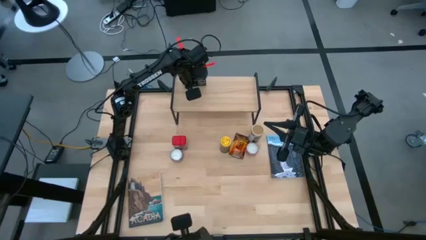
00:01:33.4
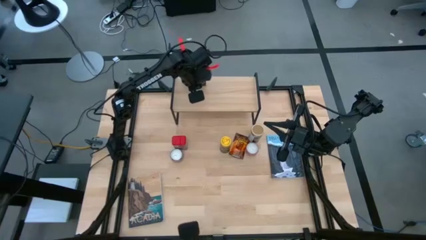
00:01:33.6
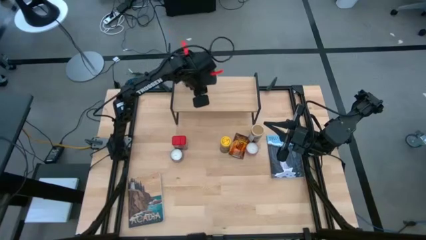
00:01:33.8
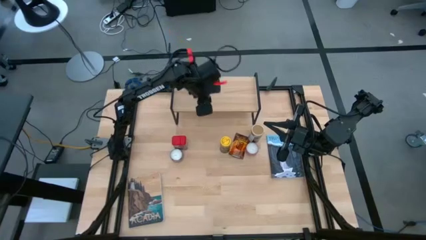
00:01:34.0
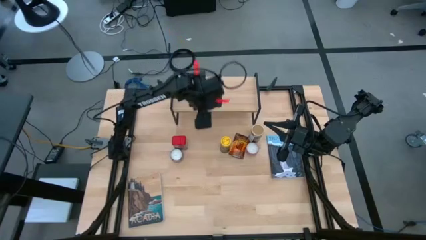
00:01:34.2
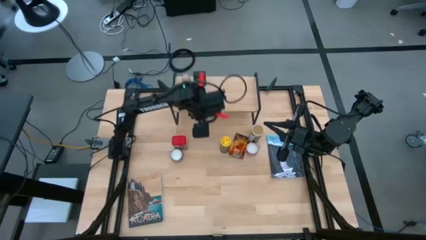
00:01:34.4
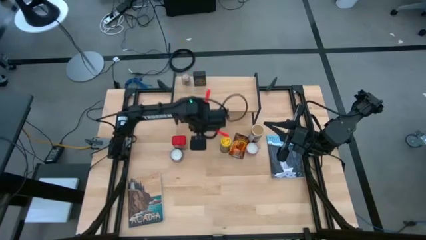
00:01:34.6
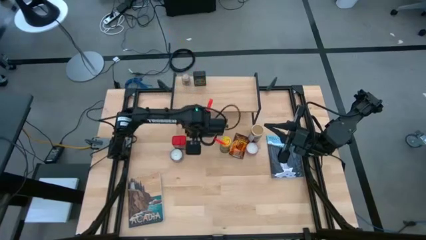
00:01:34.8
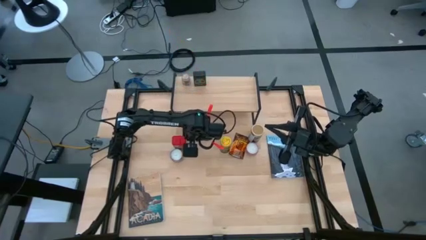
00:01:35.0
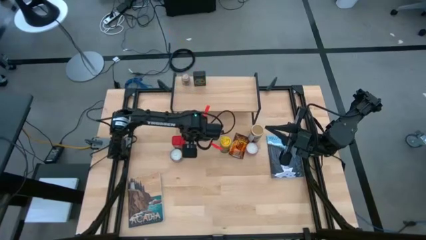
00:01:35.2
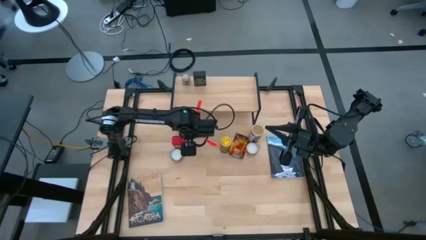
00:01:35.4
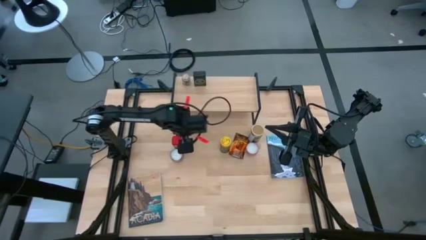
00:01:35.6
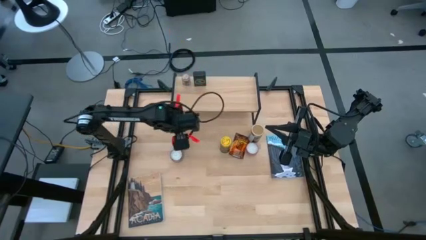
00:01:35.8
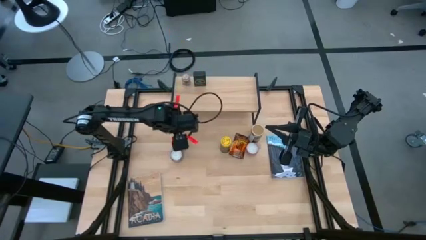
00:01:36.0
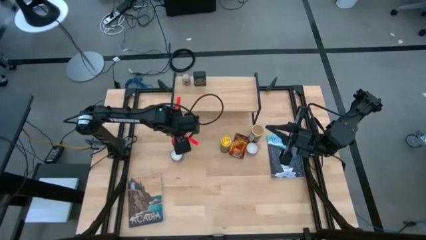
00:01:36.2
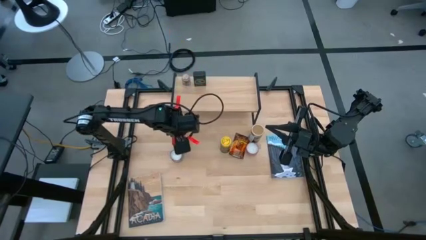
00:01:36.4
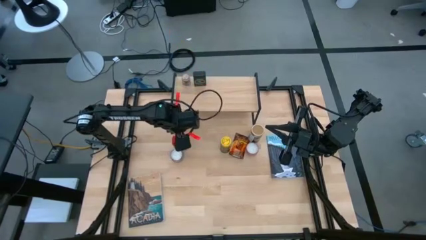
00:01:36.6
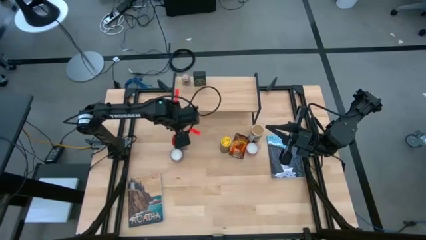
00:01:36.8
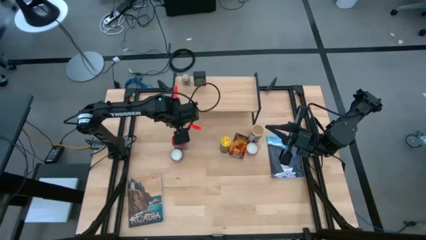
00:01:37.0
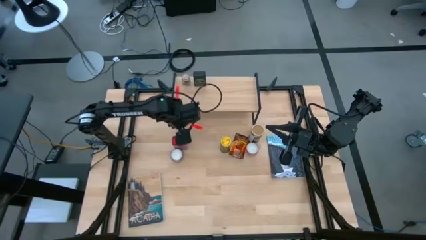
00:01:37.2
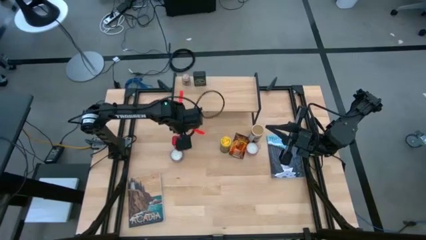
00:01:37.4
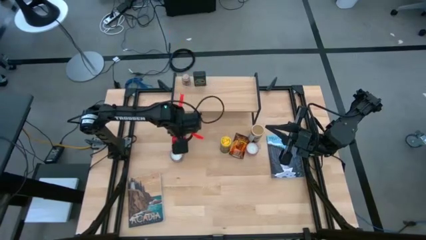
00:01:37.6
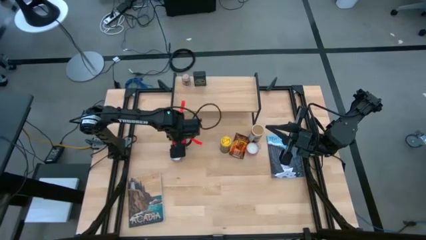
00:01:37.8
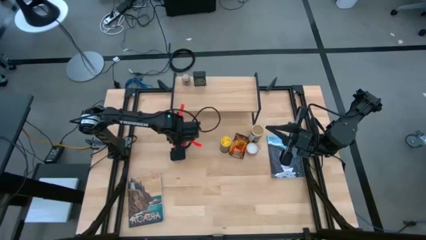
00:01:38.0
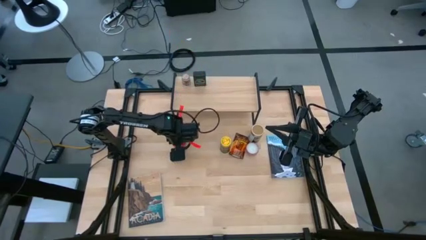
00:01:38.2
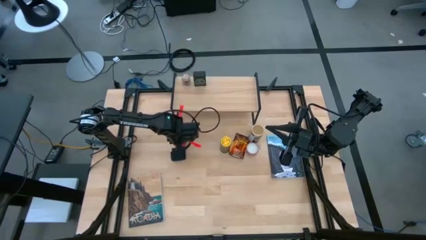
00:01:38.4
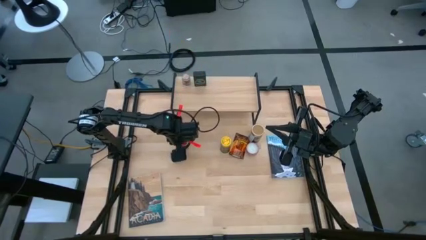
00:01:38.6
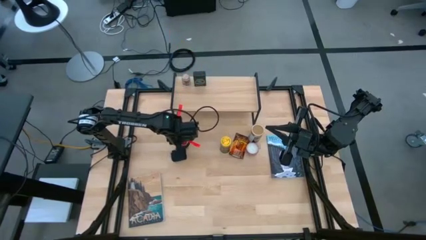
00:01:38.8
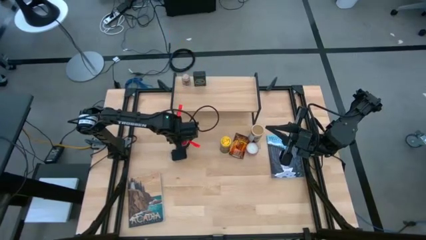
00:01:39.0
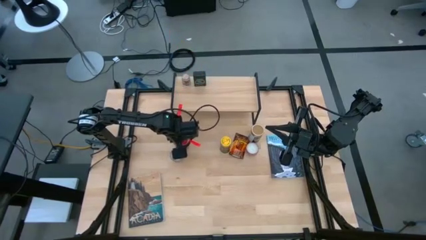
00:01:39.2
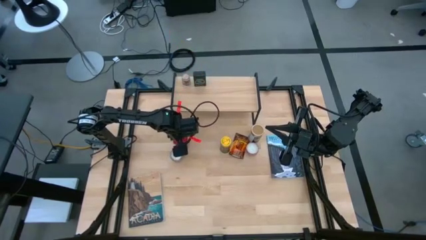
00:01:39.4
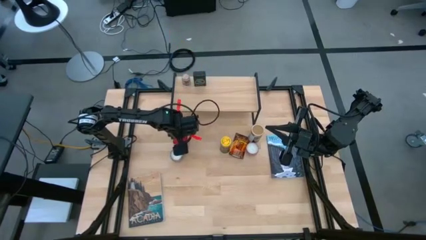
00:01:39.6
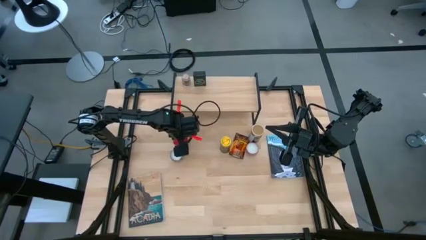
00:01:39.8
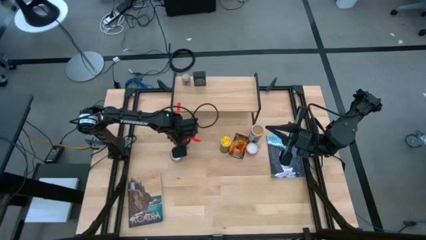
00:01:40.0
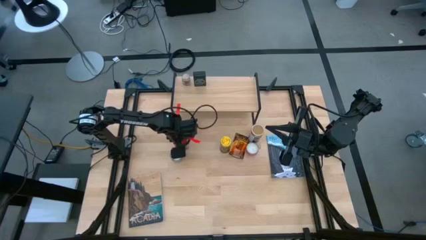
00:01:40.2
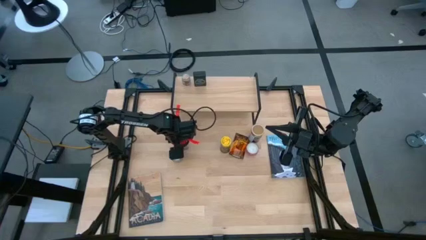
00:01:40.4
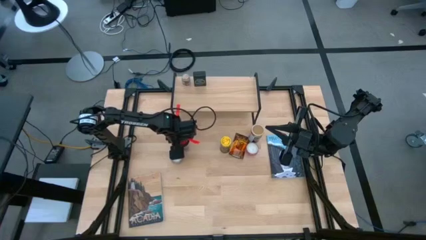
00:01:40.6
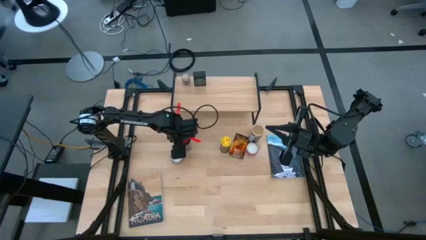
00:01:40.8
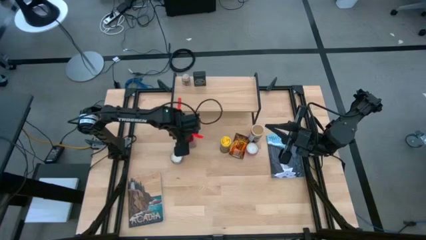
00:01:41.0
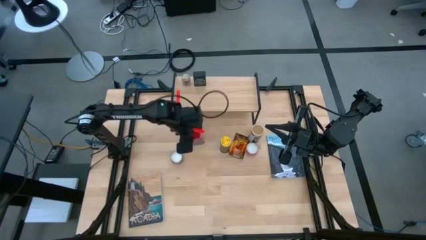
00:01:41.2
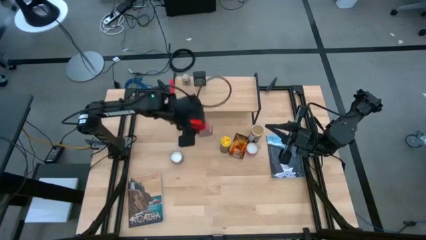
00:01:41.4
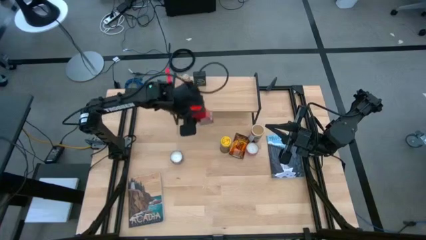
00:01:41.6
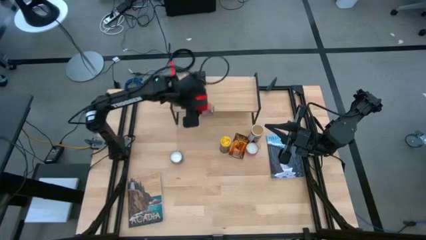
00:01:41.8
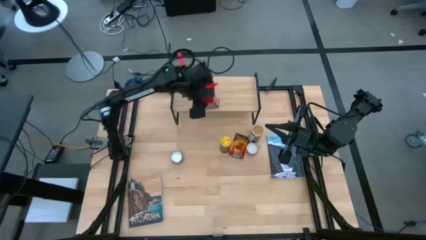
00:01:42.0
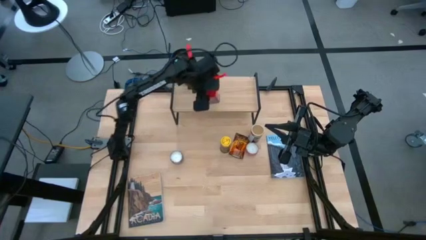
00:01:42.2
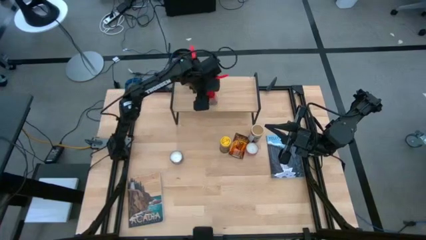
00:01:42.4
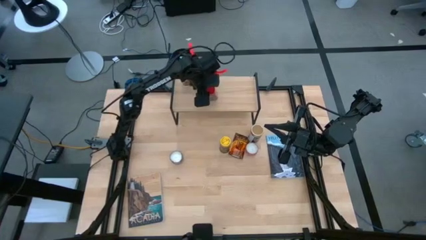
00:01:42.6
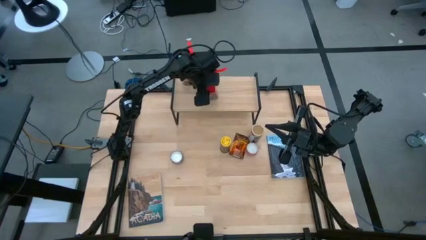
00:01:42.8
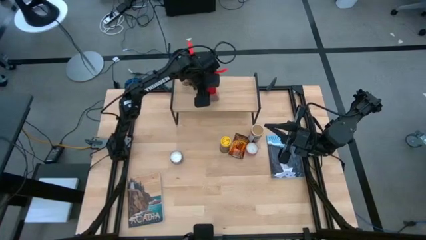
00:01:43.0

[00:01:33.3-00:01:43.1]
Task: Shelf spices
Put the red seasoning can on the shelf

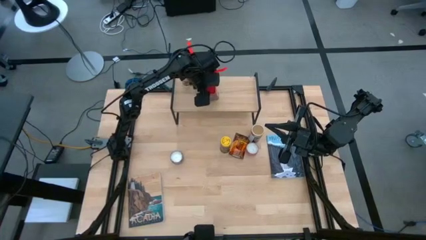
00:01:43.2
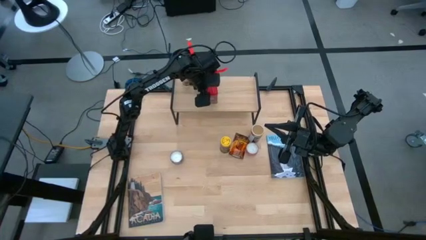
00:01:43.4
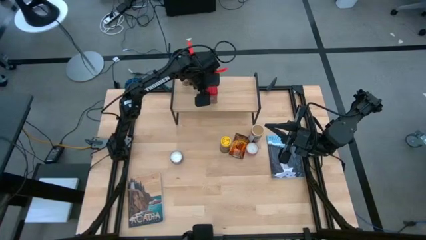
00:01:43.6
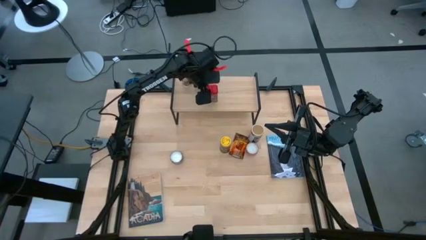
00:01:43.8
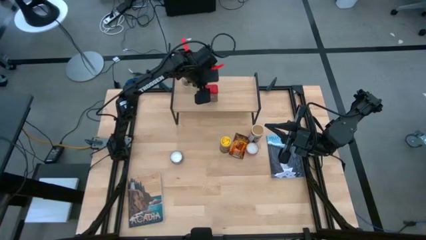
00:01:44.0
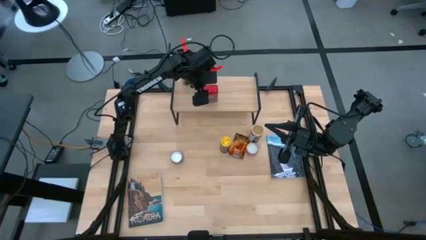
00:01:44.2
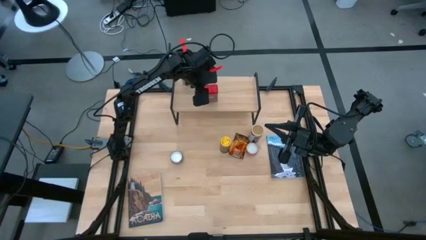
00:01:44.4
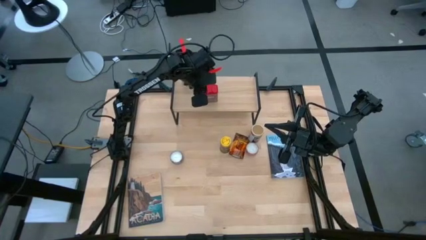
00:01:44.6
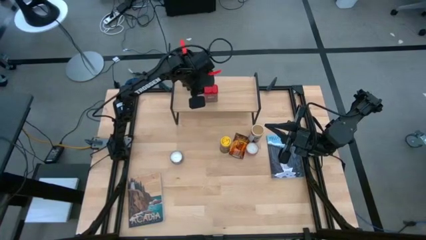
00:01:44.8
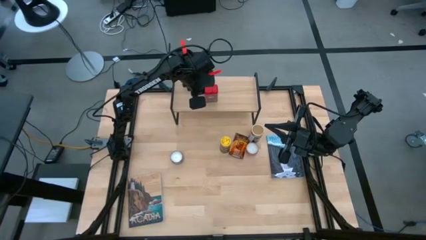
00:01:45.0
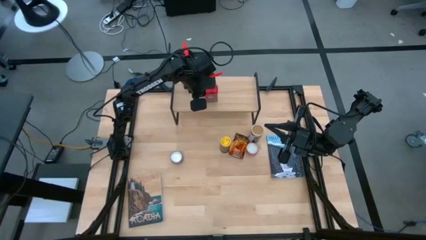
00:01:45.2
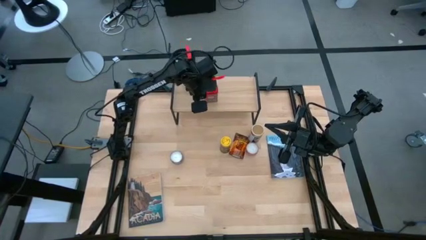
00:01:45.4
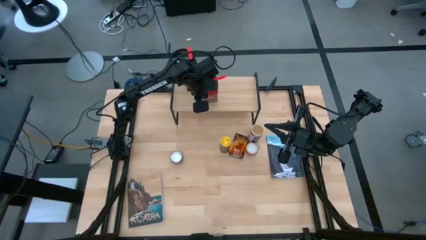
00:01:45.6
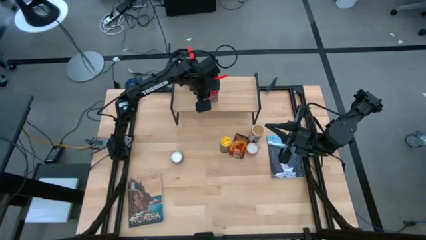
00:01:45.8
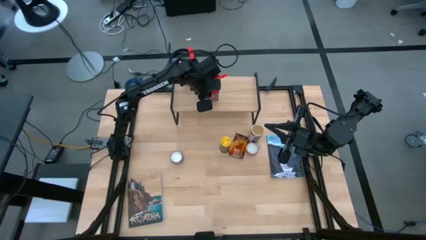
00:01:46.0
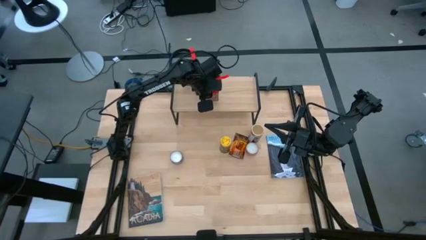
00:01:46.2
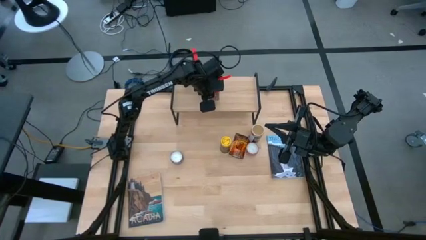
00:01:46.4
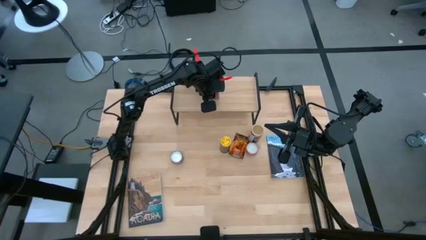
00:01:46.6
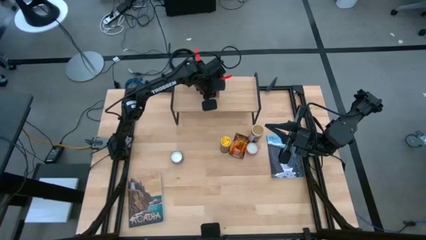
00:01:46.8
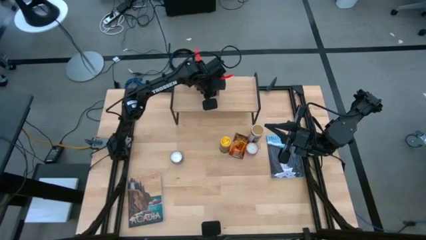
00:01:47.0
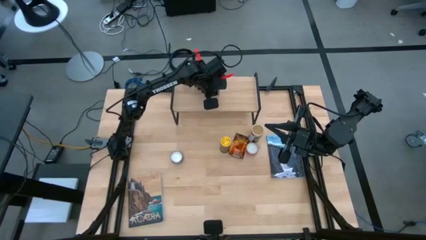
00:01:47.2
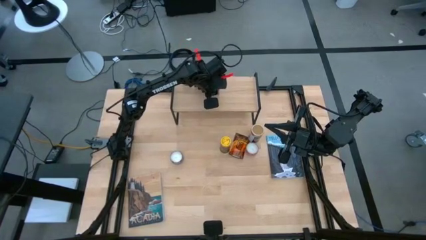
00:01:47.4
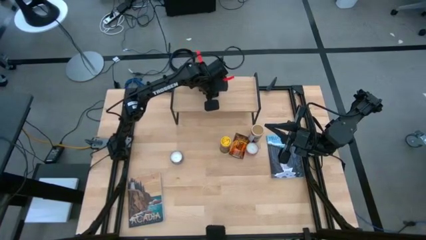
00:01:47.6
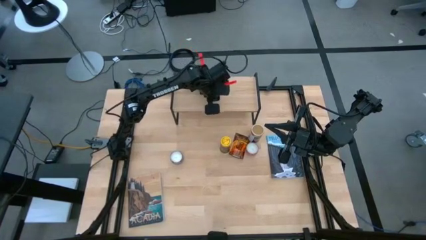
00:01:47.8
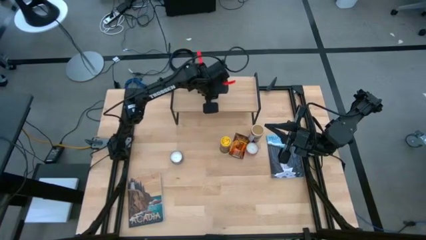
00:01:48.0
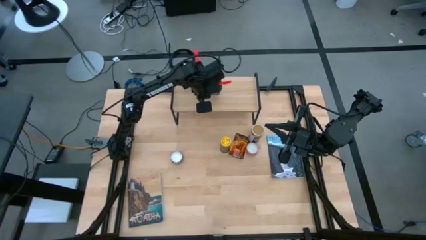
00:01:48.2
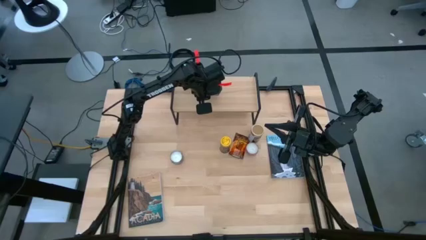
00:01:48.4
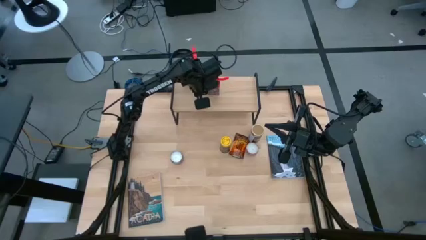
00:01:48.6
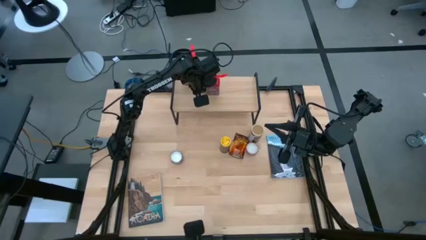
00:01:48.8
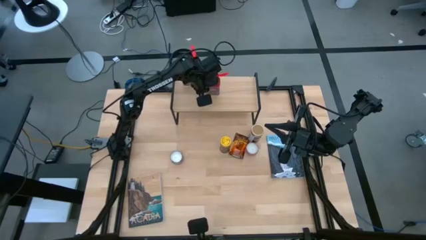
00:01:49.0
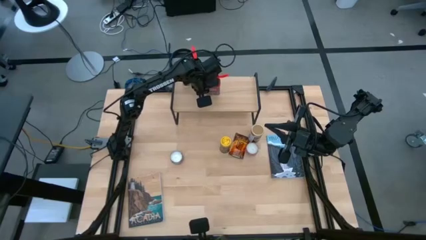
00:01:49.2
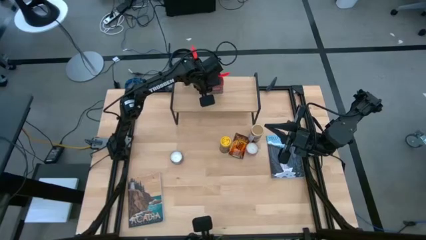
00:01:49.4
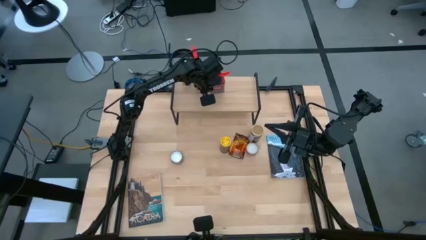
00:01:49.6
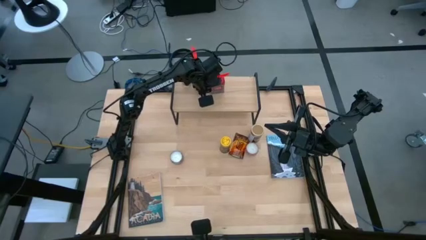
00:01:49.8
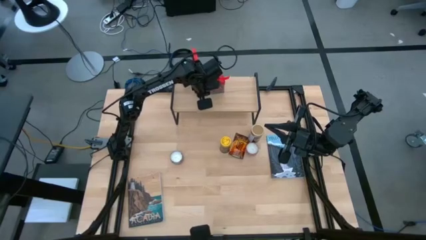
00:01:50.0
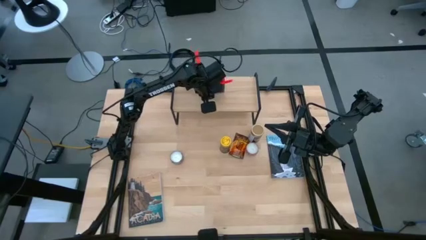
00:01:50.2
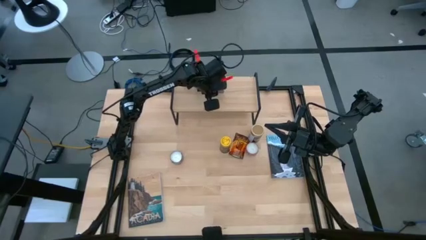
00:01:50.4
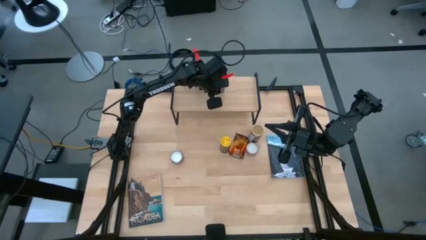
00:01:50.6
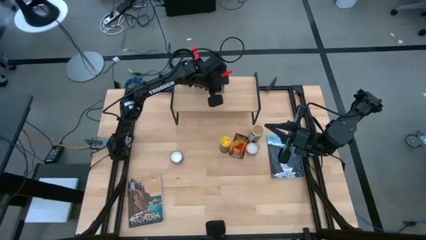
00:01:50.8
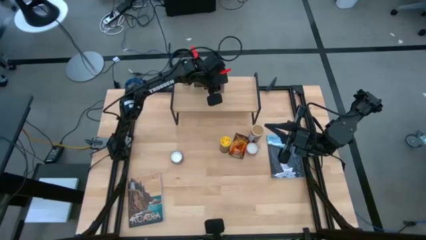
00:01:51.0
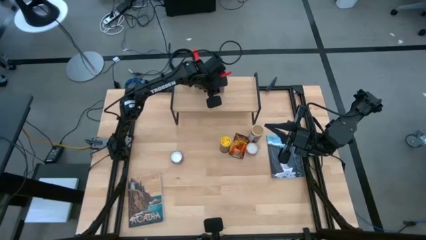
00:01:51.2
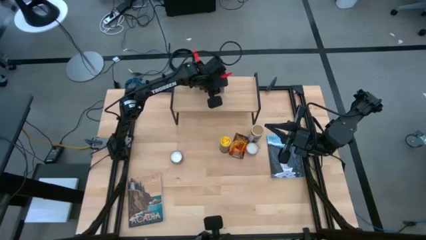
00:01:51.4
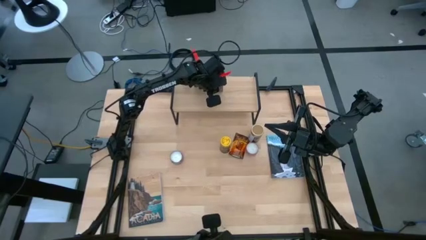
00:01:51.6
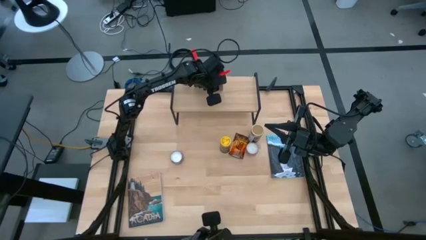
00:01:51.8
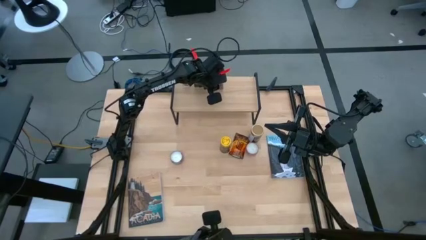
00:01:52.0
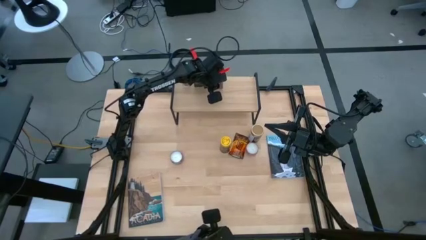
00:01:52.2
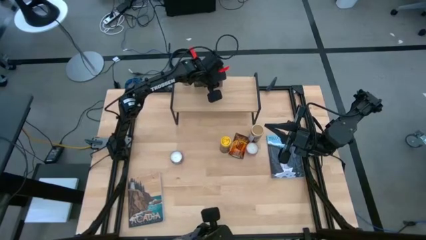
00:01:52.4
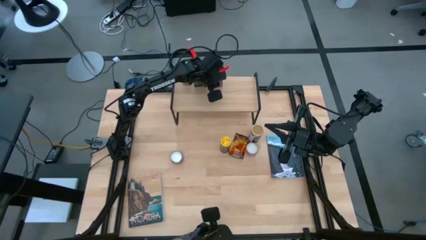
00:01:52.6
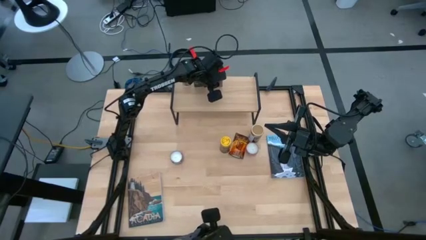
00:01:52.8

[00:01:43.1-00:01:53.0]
Put the red seasoning can on the shelf
